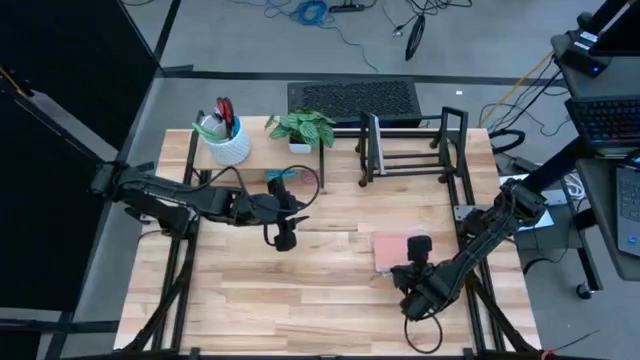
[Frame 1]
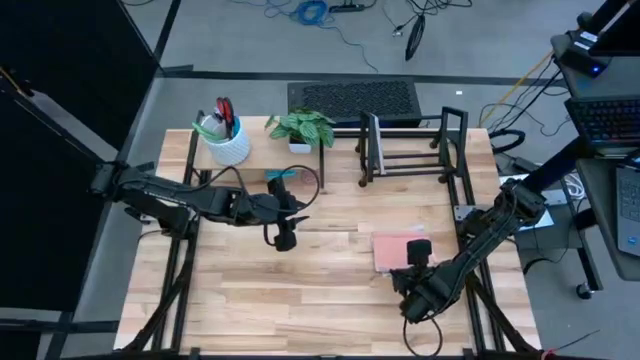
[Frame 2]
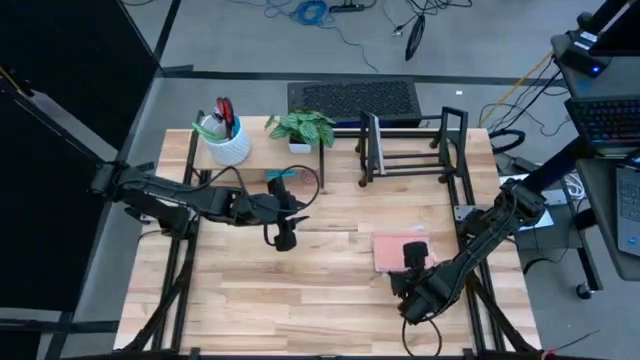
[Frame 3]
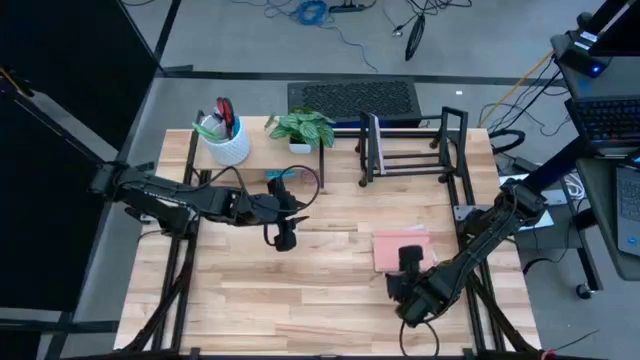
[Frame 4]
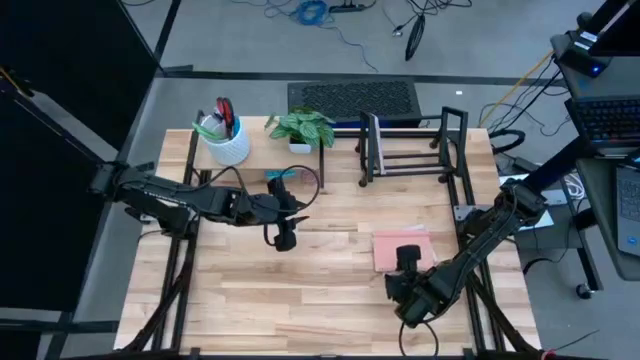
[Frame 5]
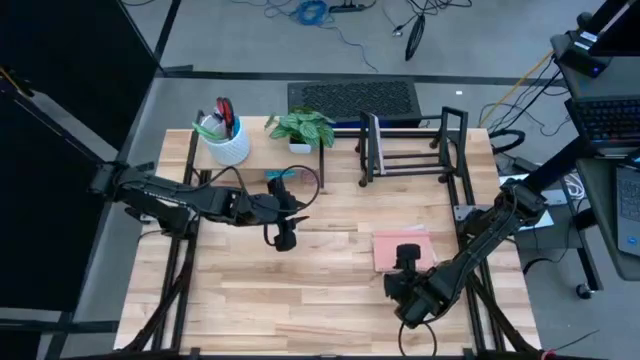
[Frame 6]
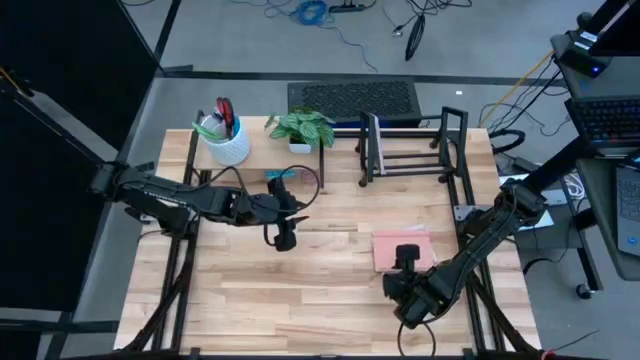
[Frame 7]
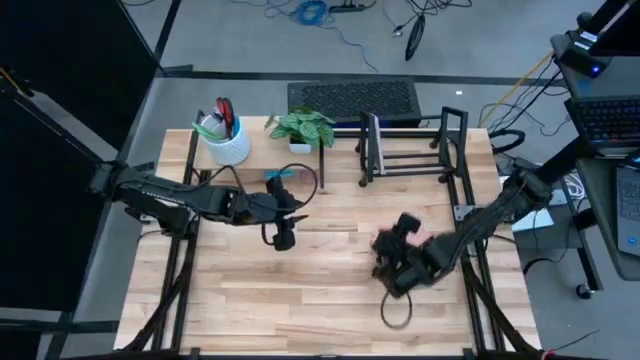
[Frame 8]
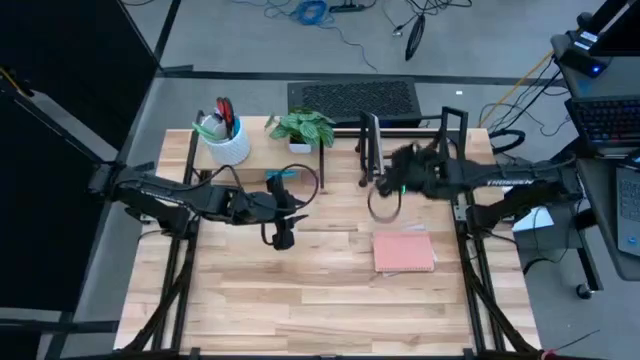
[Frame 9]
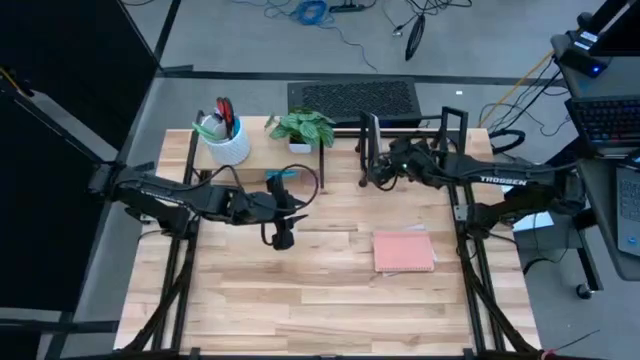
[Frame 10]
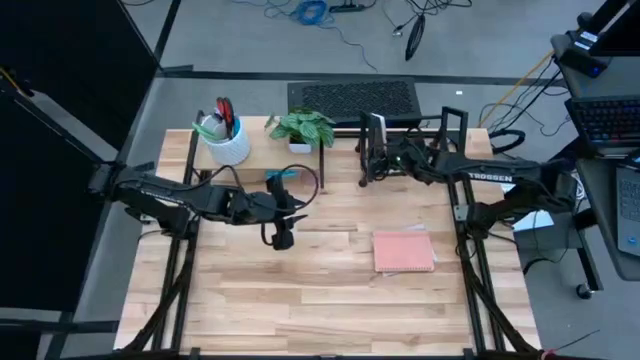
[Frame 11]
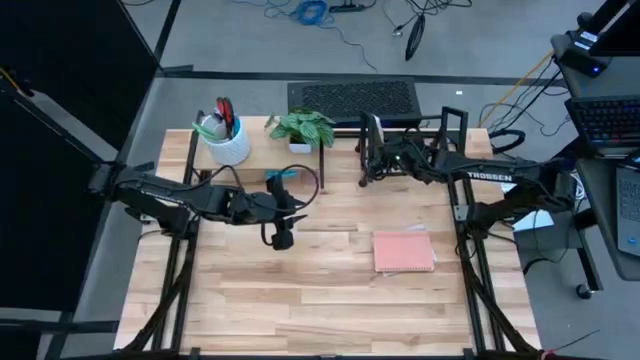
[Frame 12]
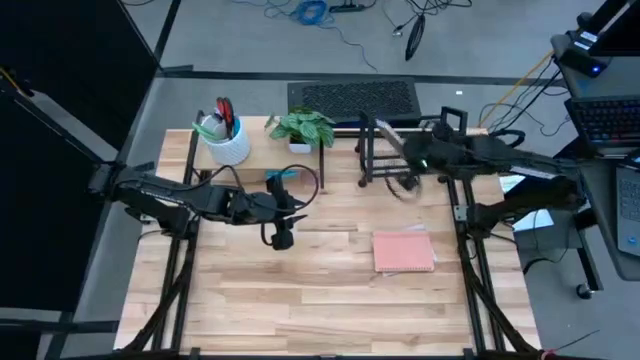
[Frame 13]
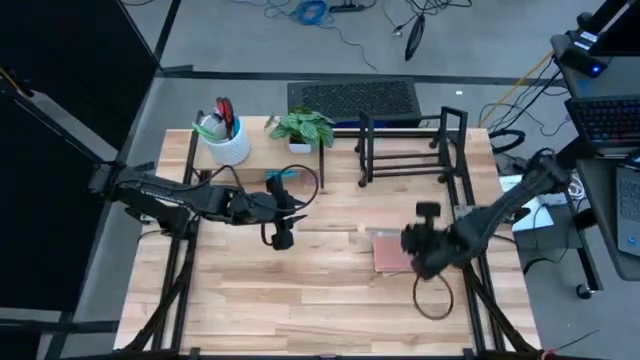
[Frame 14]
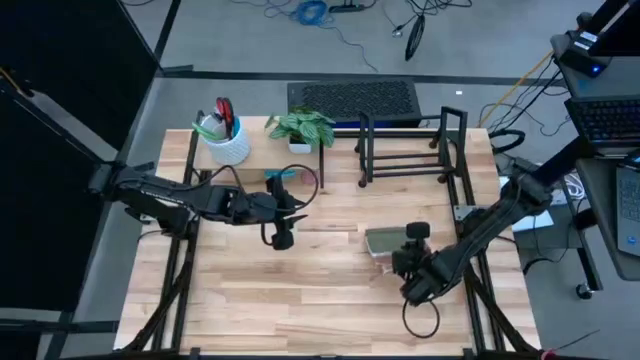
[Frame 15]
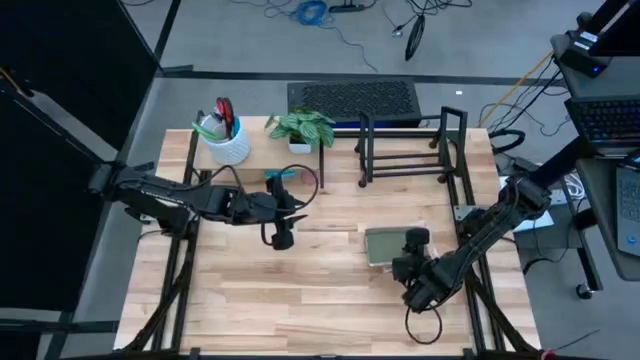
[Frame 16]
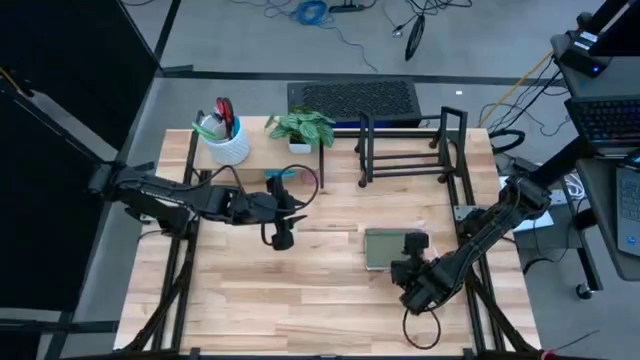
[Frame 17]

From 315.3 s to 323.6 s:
Task: Stock shelves
Remove the green notebook from the black bookshelf

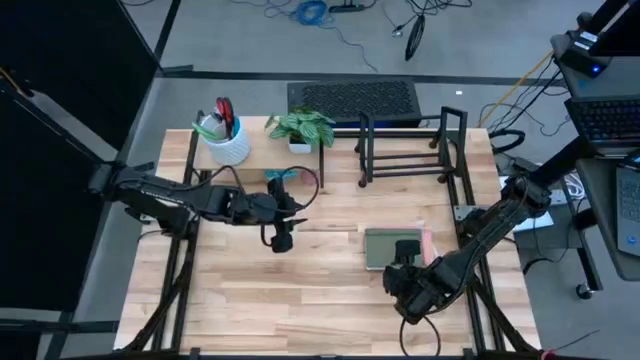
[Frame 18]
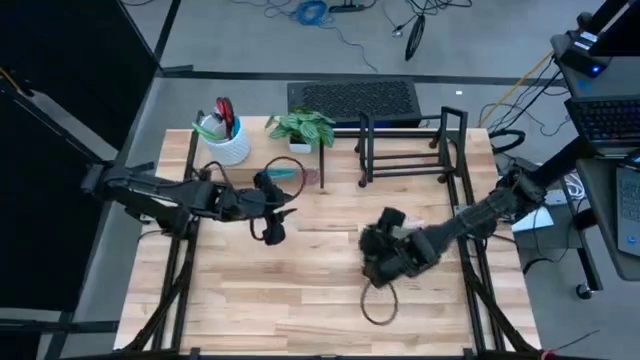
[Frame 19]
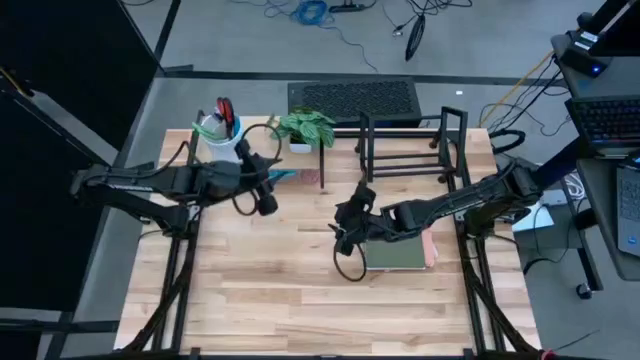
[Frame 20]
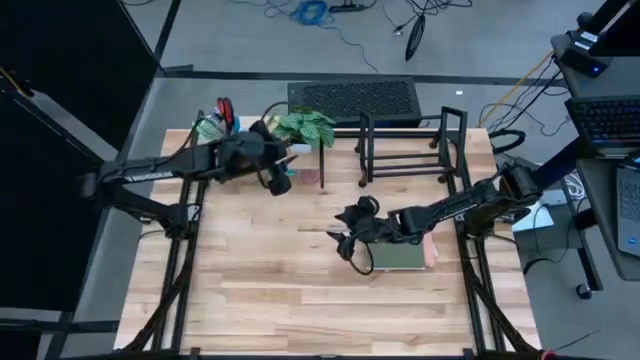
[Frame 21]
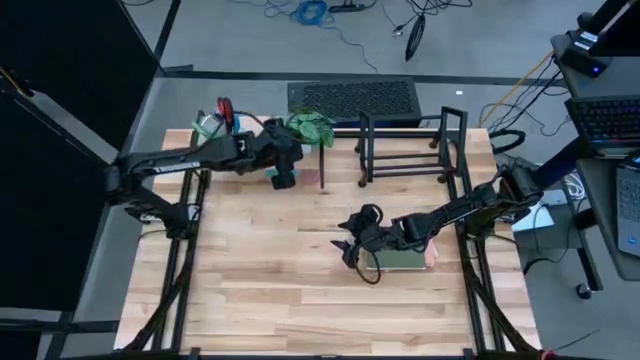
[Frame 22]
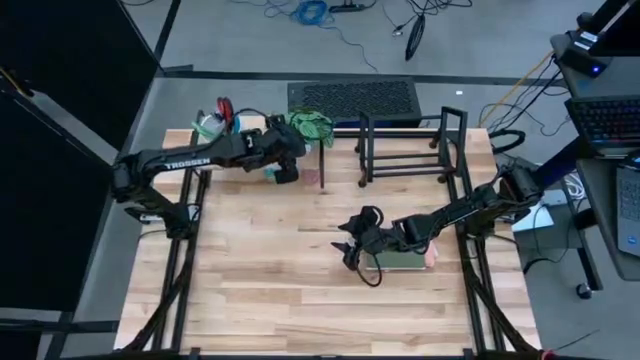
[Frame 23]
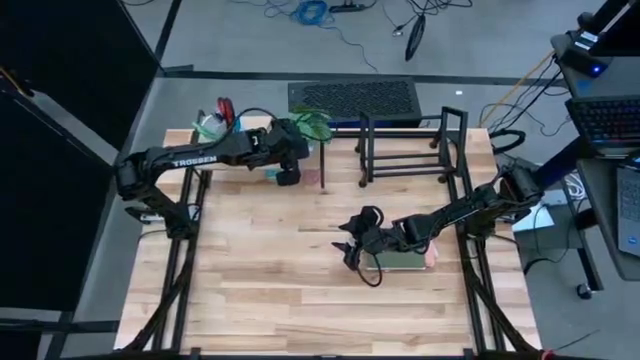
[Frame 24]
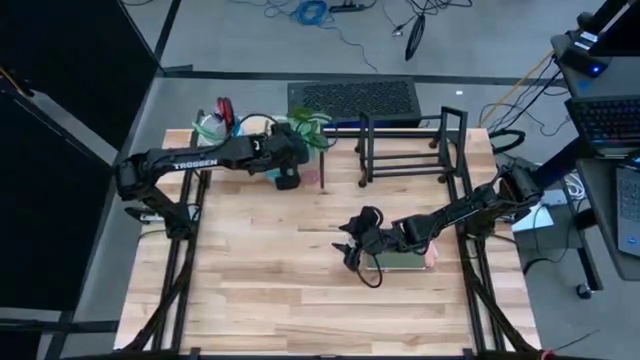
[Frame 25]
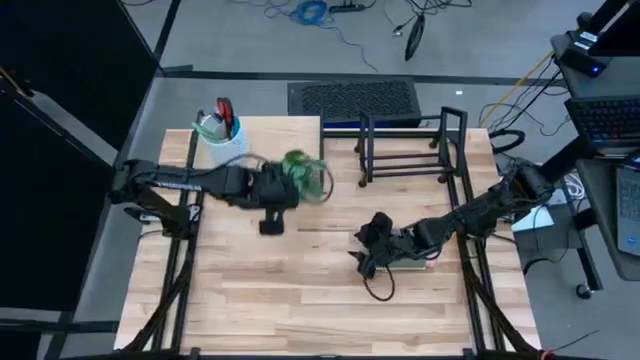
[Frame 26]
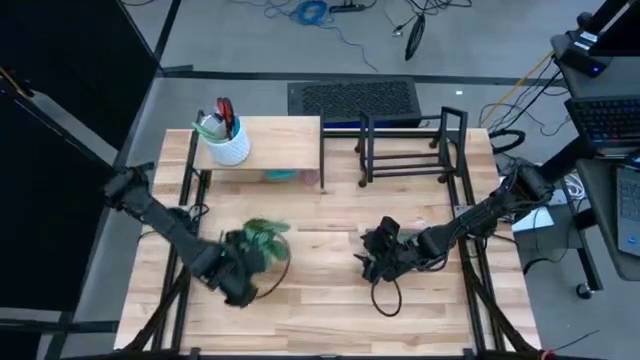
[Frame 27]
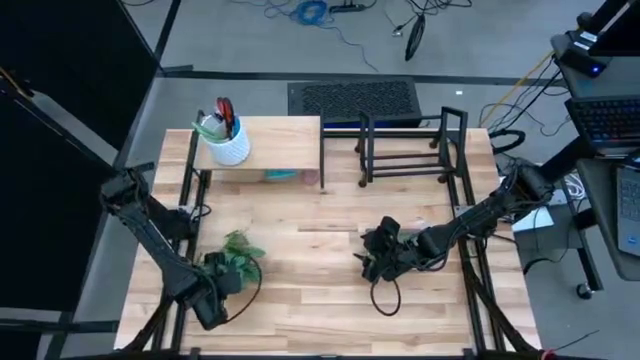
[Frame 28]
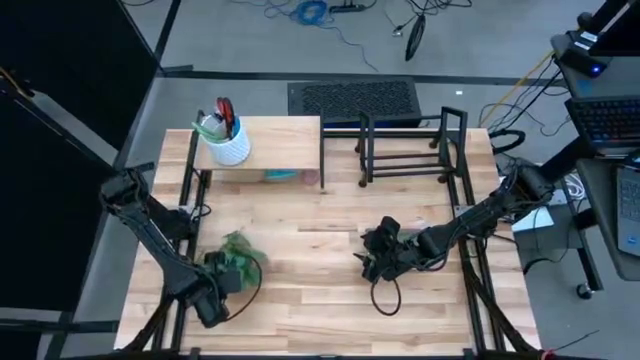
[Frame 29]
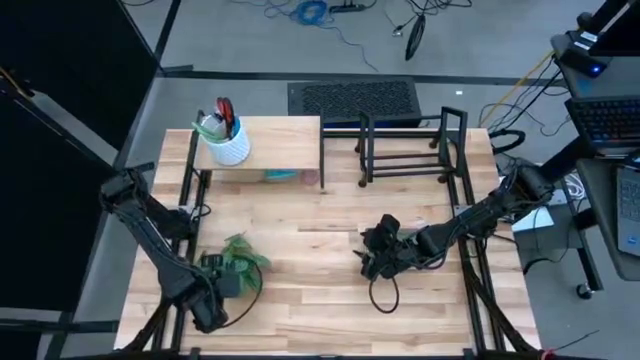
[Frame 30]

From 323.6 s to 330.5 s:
Remove the white vase plant from the shelf

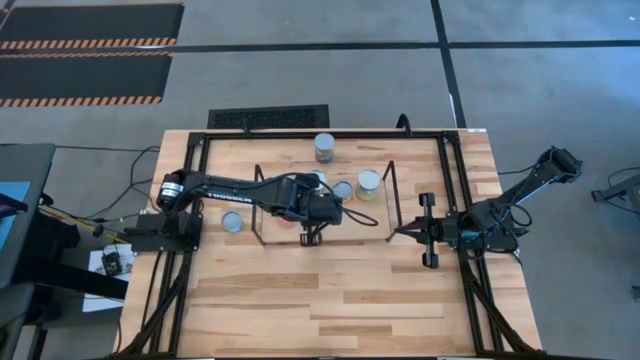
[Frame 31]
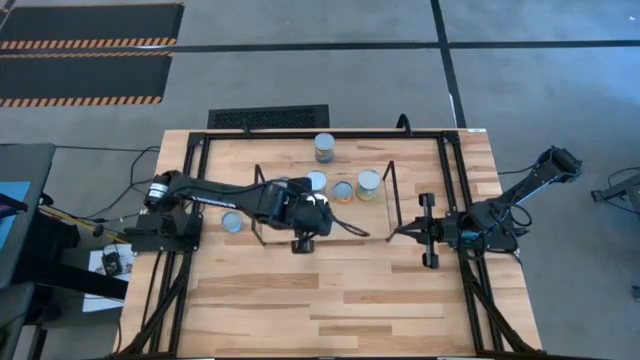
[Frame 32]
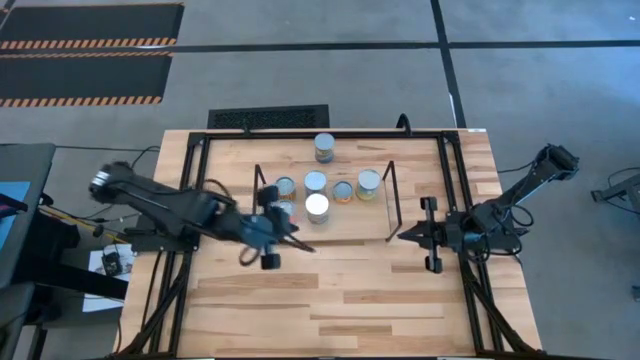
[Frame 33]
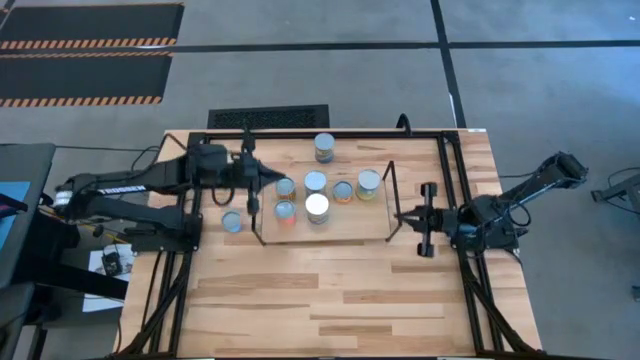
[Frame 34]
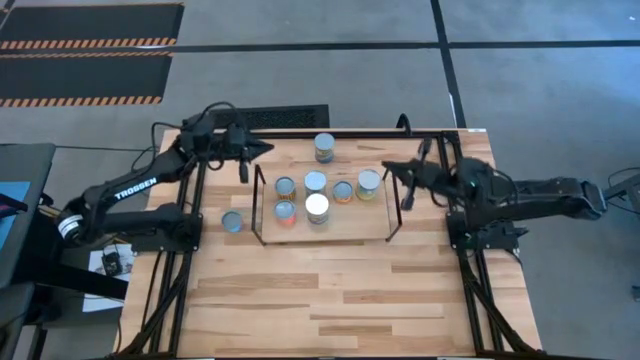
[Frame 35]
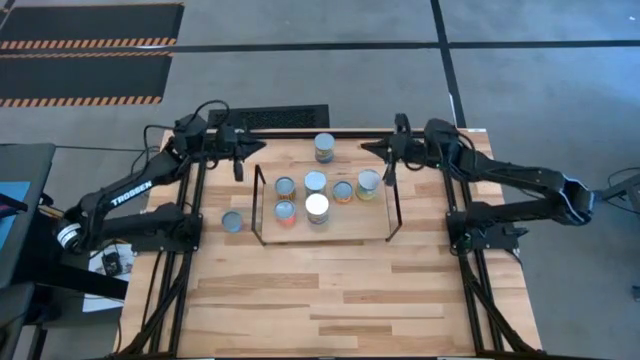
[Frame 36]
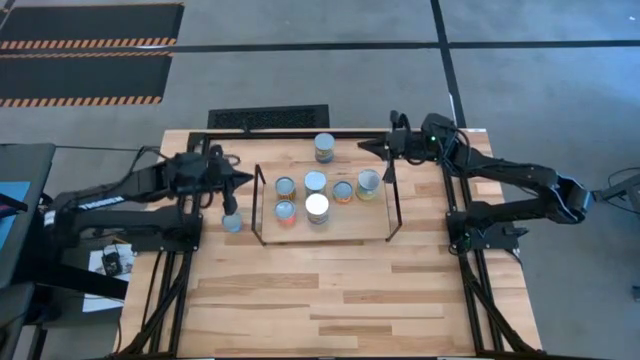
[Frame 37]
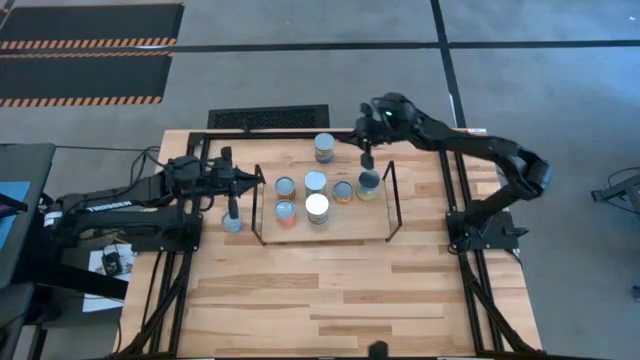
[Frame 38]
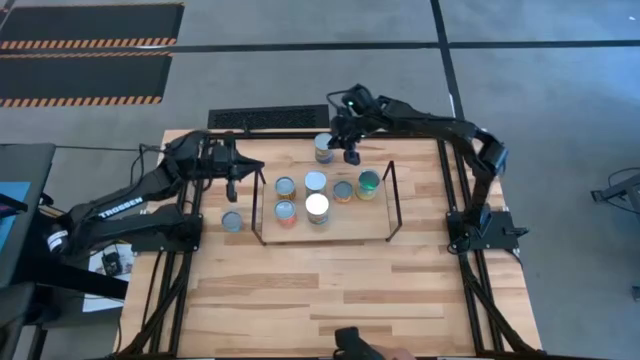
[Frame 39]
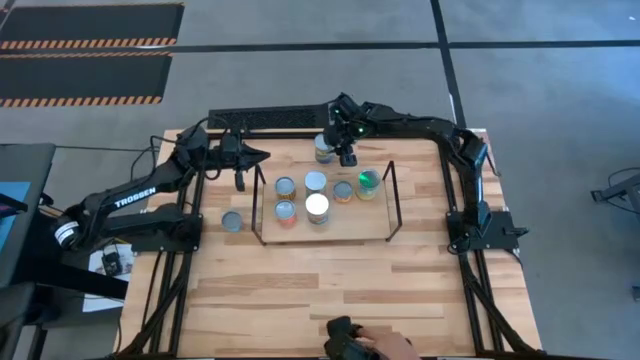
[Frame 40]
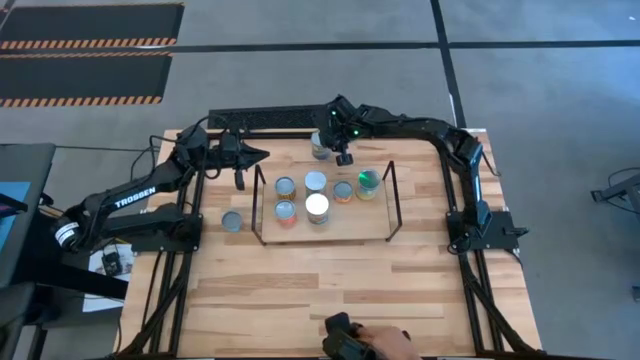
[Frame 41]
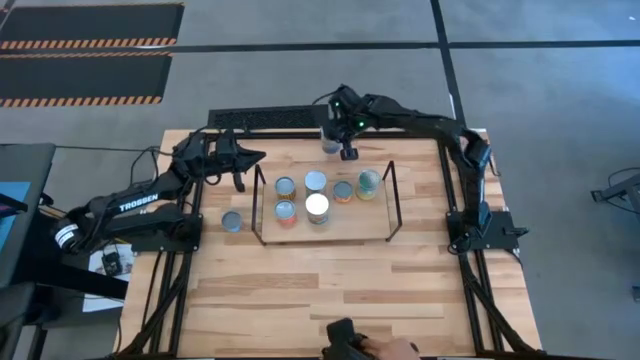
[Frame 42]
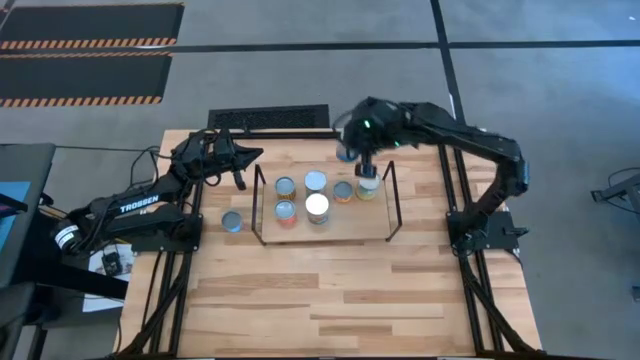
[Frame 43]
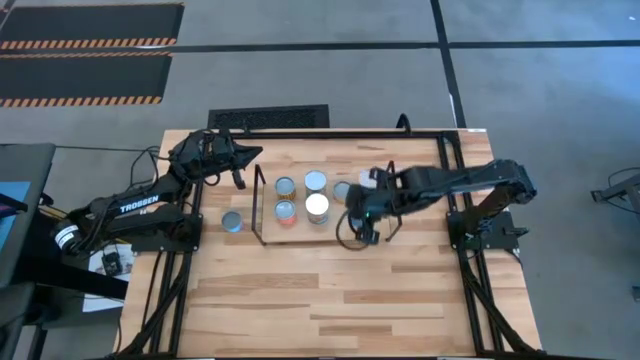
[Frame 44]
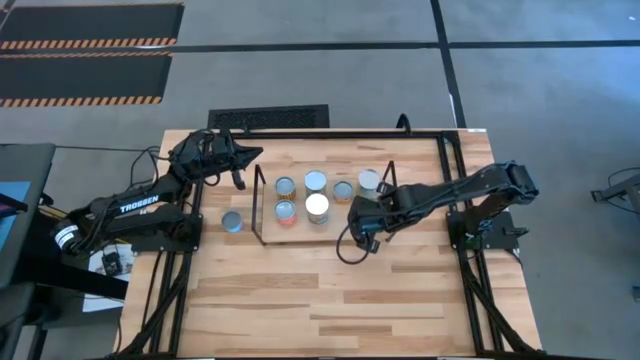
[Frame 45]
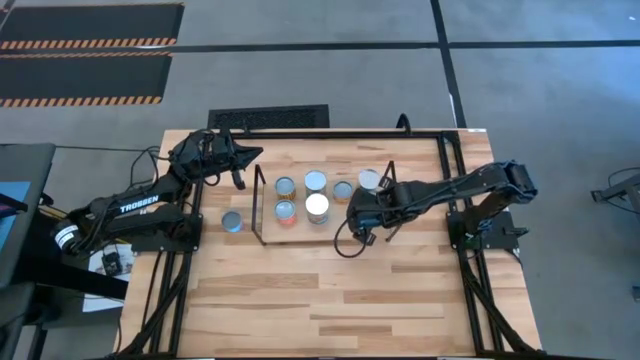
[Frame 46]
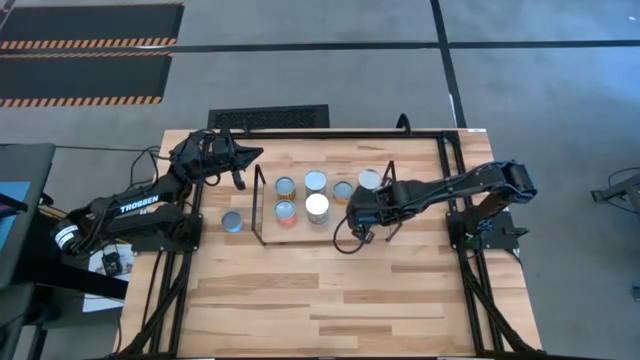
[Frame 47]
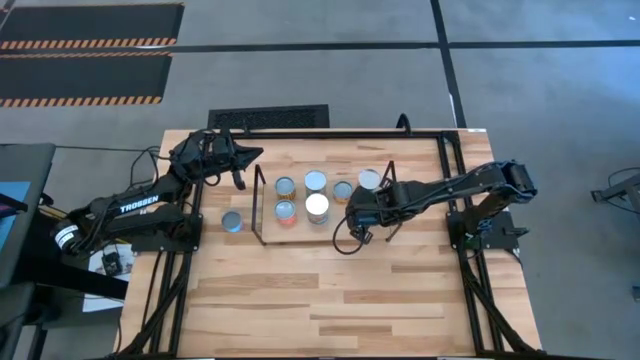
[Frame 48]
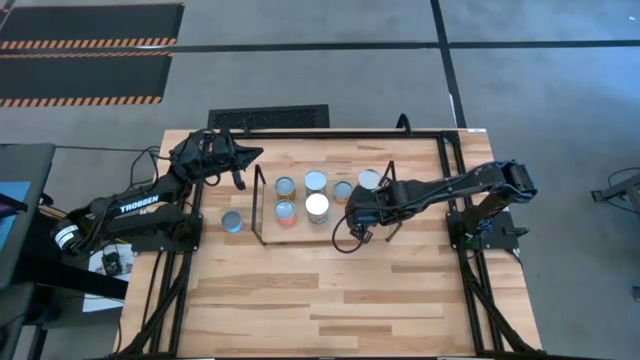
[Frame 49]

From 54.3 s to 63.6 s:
Task: Pick and place cans onto a shelf
Put the peas can on the shelf aligned with the carrots can
